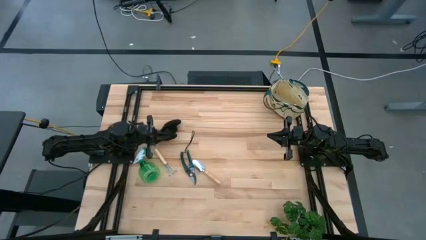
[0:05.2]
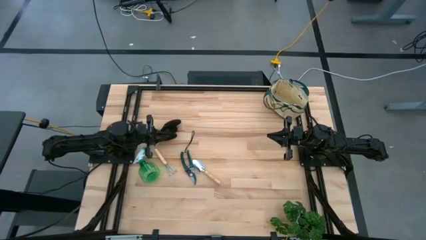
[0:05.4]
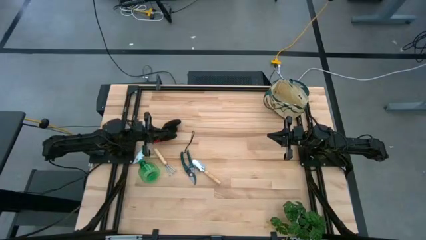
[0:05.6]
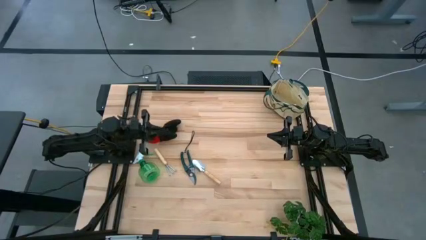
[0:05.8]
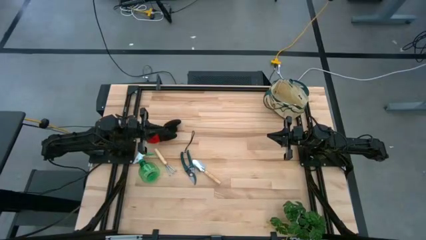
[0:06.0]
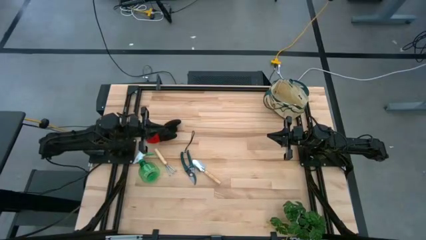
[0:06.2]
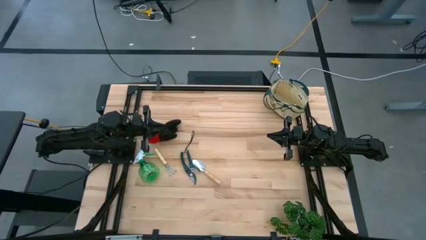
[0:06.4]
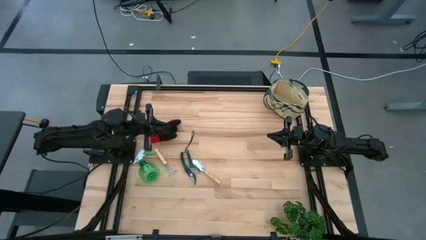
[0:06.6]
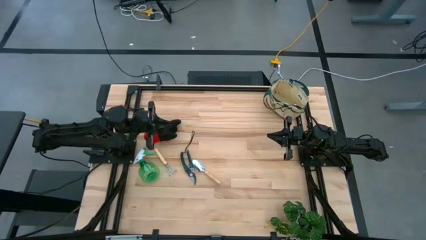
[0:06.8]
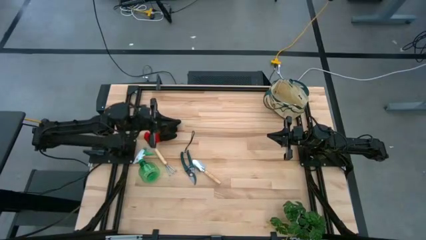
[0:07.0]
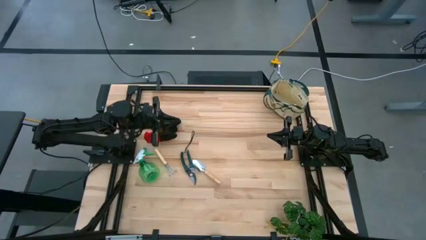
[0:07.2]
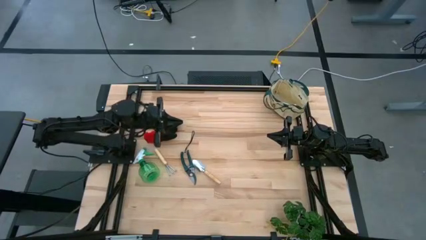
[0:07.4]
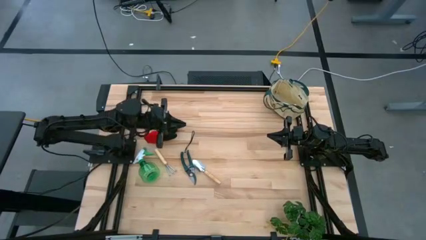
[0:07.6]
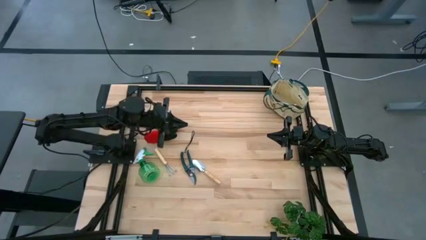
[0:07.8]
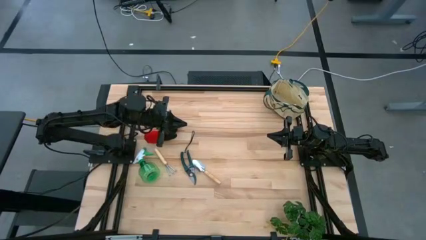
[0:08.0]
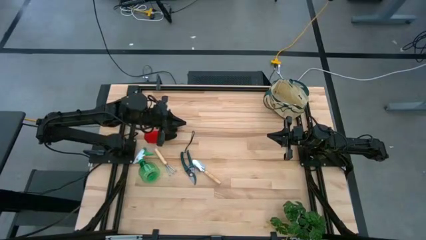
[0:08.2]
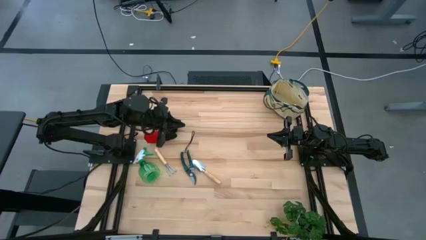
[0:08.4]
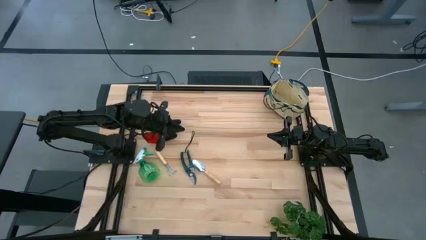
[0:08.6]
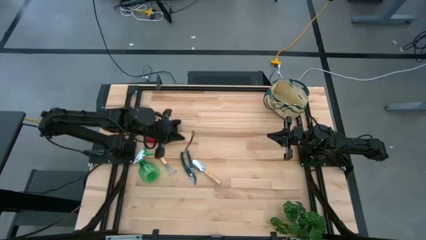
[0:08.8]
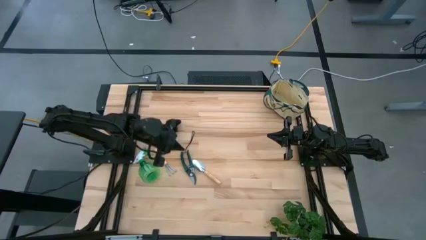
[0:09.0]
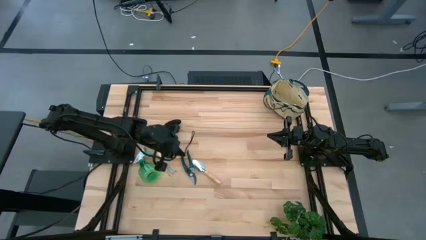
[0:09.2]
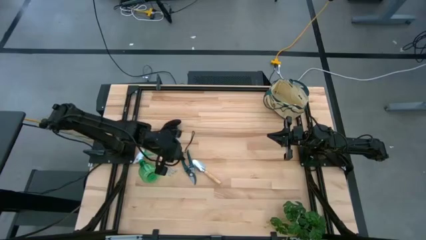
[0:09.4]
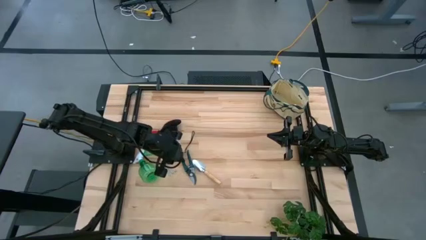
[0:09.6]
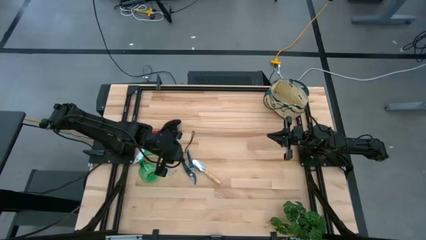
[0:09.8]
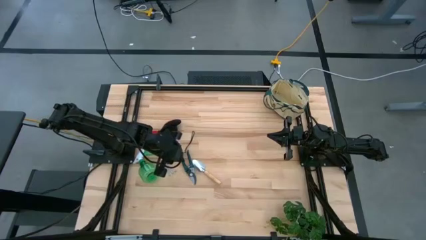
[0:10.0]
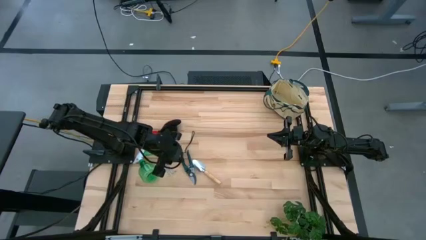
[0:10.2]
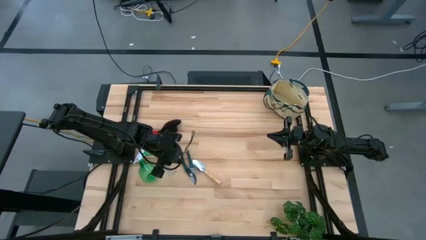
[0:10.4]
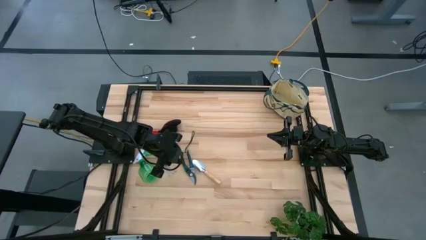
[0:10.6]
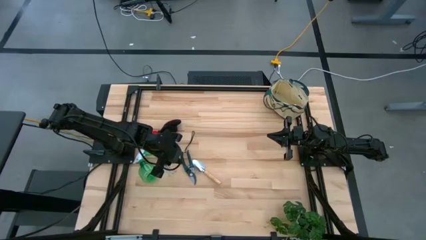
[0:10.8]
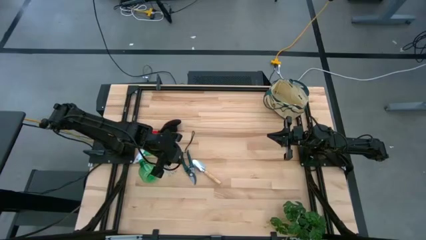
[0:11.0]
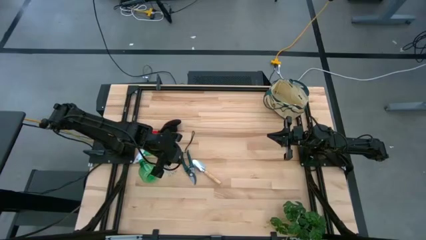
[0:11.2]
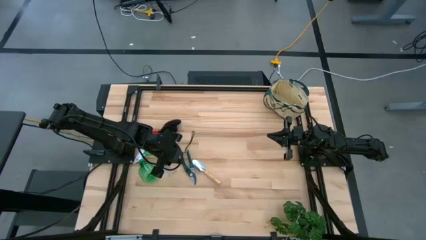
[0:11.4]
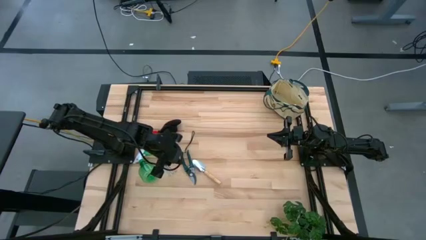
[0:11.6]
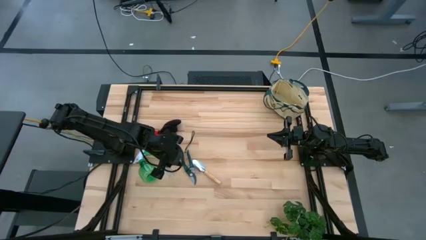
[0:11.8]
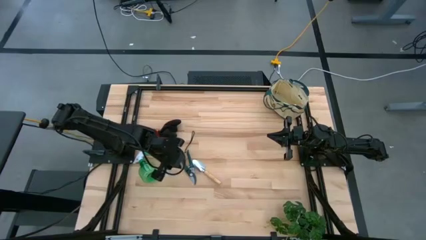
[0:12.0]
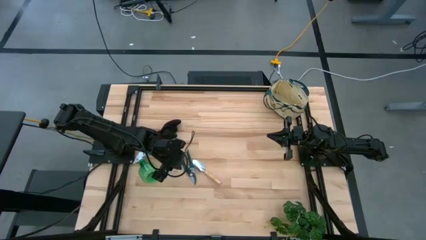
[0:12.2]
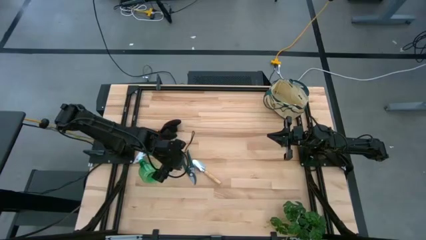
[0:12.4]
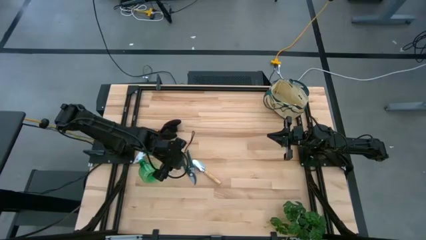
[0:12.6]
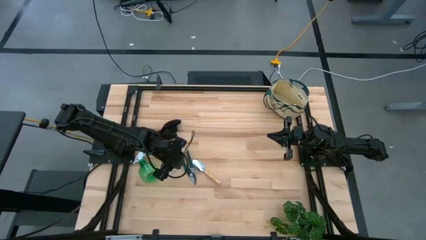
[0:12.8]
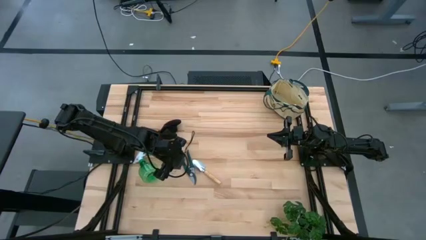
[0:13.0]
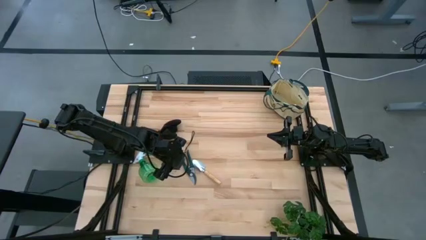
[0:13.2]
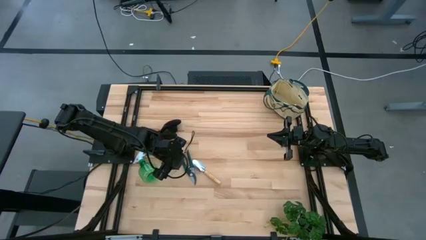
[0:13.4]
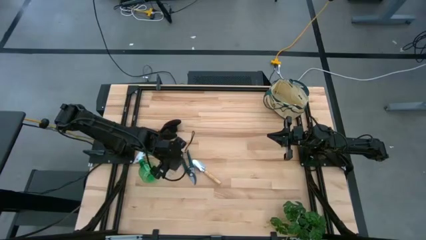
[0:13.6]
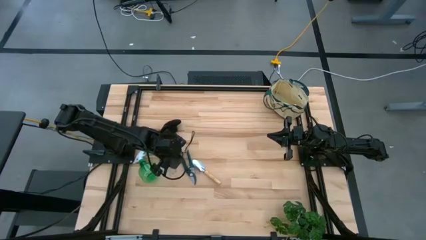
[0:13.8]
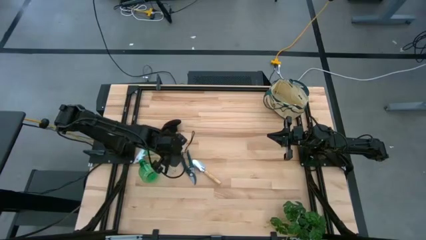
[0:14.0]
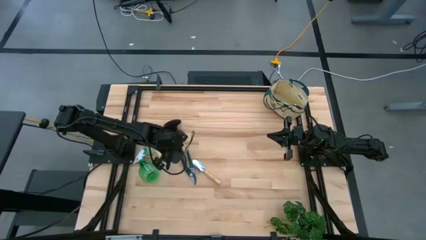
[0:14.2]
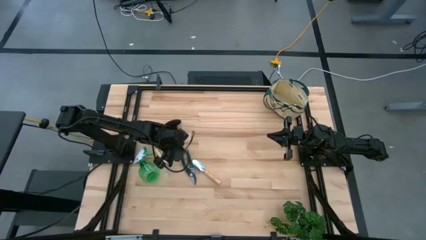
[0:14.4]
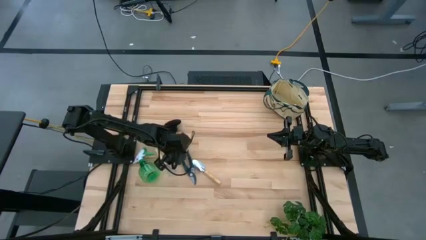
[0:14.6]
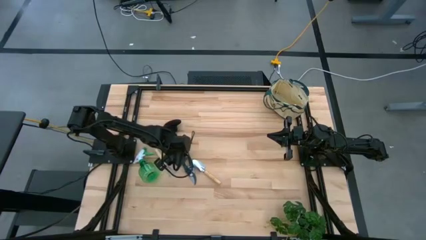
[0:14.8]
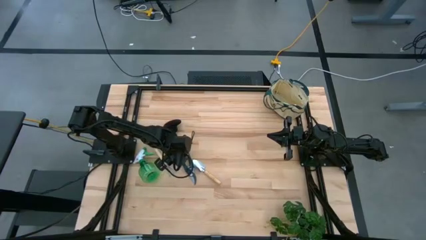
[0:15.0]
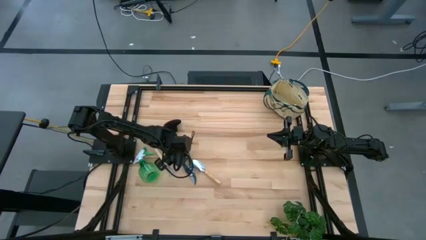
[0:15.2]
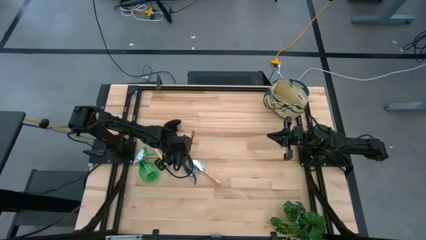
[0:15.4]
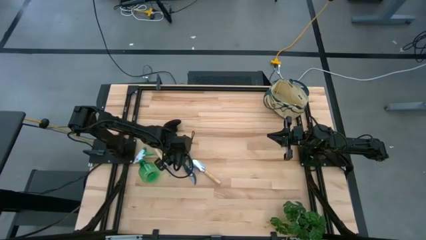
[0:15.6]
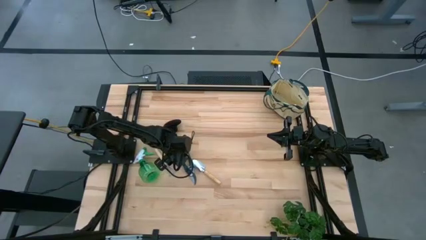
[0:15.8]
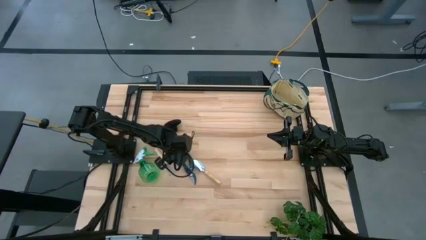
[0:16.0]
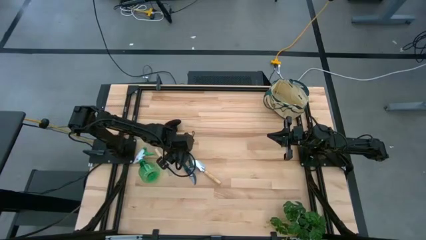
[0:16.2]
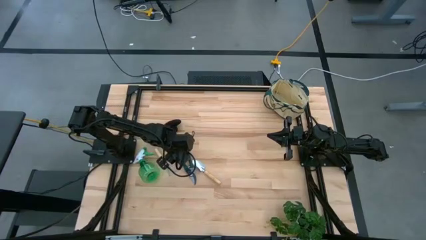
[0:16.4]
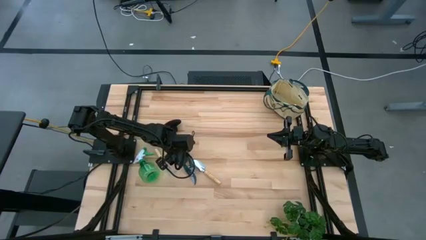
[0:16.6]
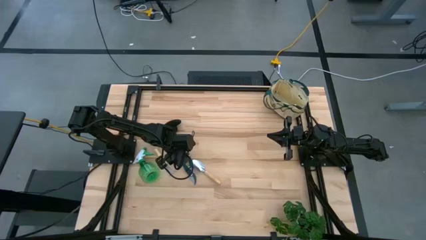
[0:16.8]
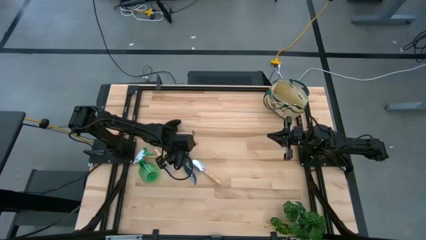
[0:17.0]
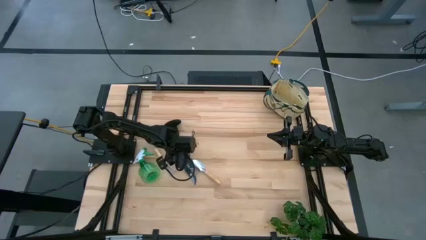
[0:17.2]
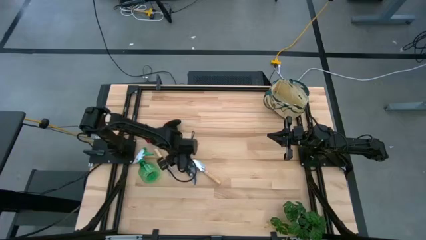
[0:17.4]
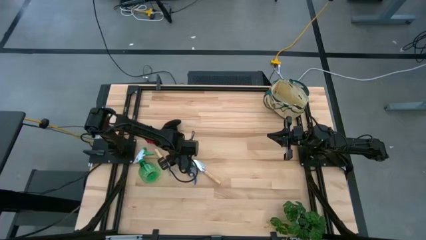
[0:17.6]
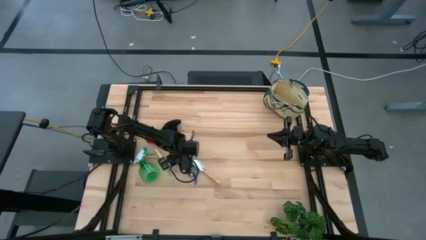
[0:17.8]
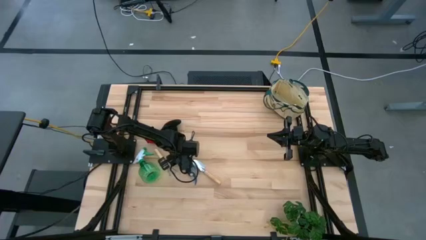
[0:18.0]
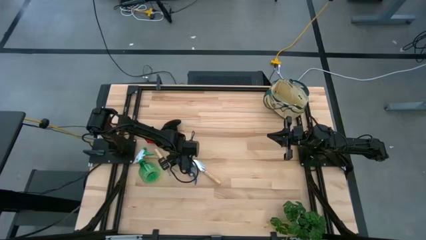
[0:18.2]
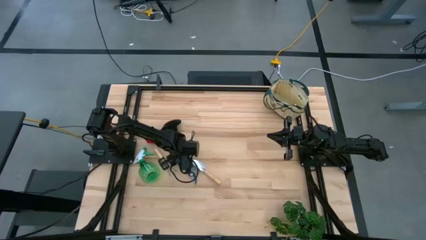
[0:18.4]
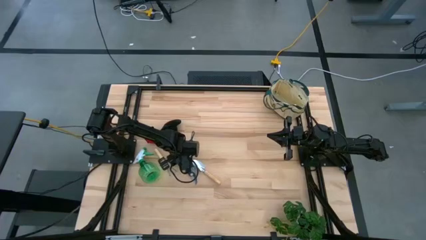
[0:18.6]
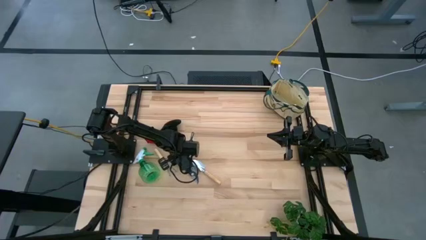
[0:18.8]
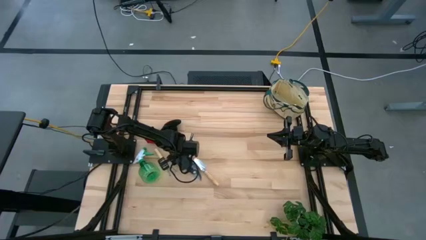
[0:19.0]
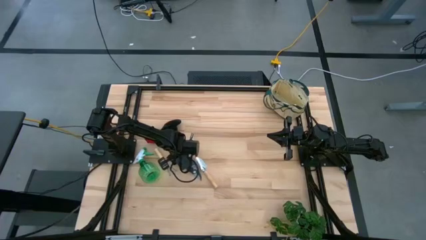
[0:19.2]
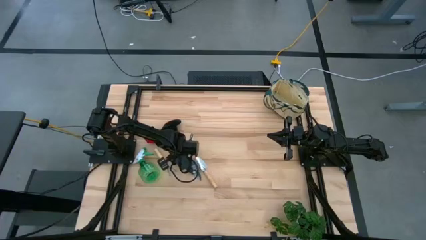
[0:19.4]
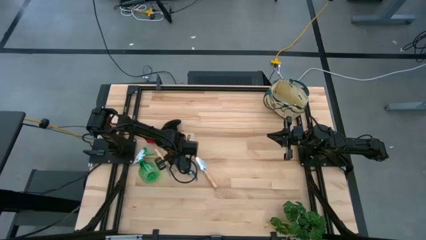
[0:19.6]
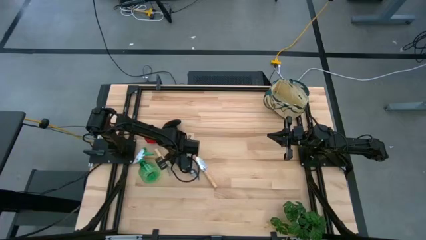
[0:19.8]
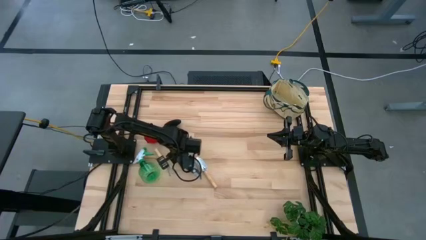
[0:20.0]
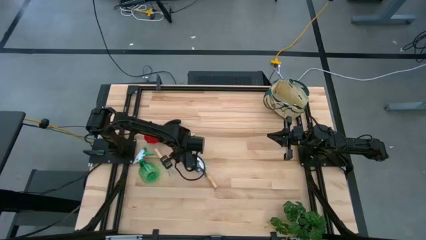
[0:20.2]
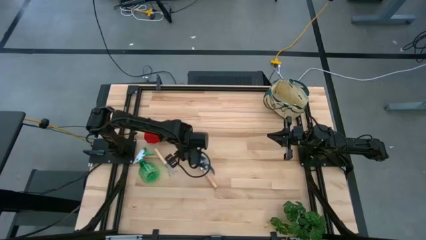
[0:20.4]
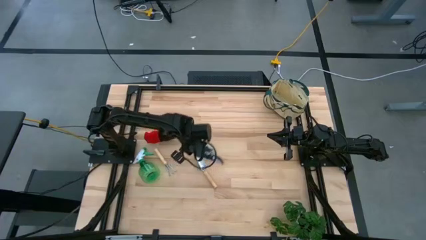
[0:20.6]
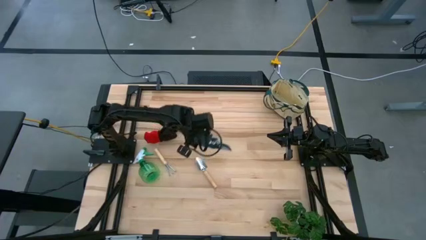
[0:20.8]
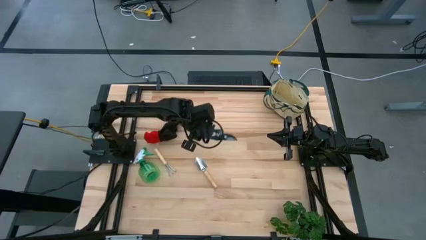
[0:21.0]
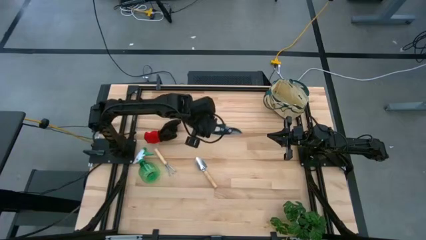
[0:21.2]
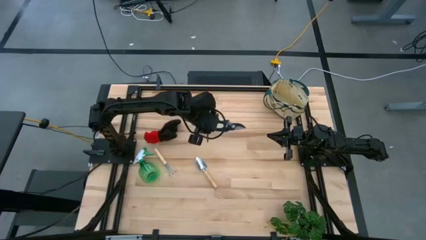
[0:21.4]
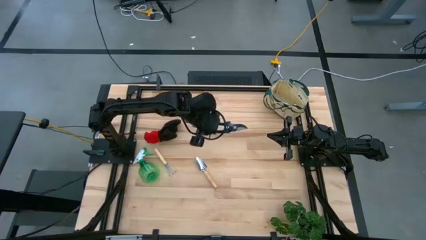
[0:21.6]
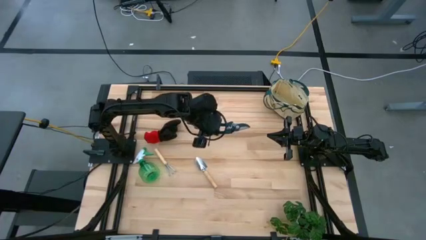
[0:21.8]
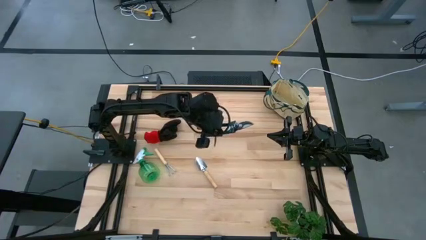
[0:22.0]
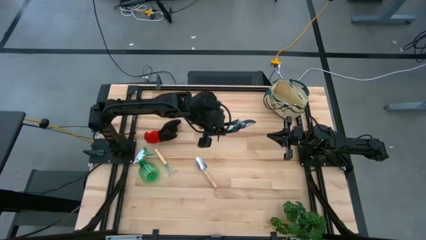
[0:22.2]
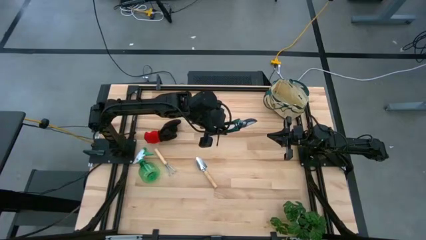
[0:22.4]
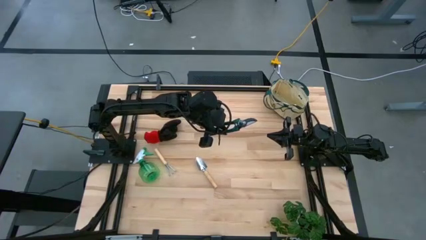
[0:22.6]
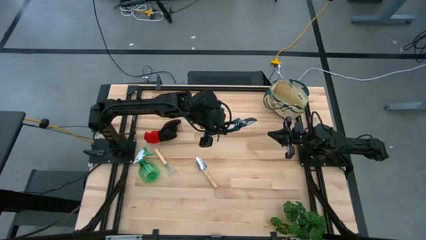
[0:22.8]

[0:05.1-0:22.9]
Task: Pick & Place Garden tools in Gardening bag
Put the shear scissor into the gardening bag
